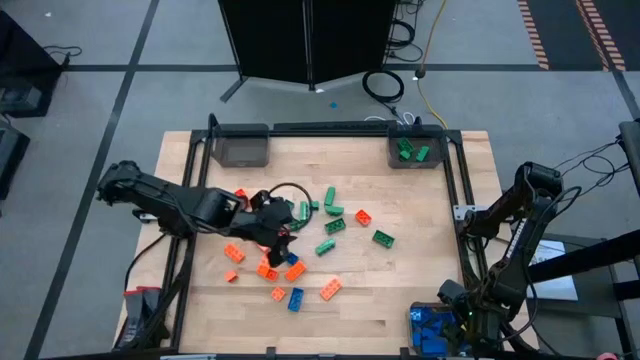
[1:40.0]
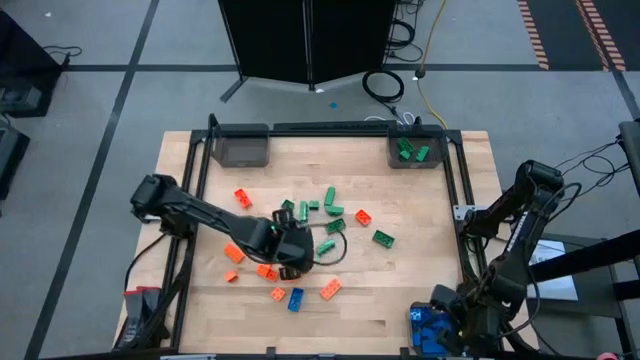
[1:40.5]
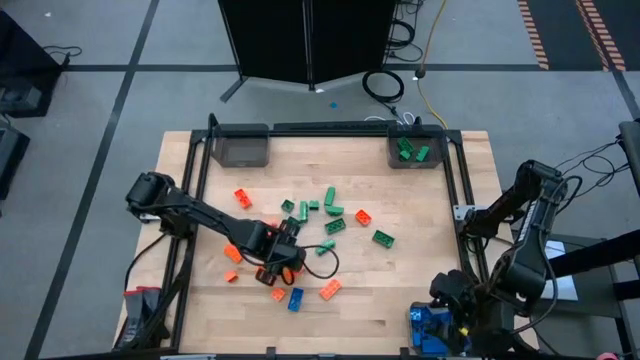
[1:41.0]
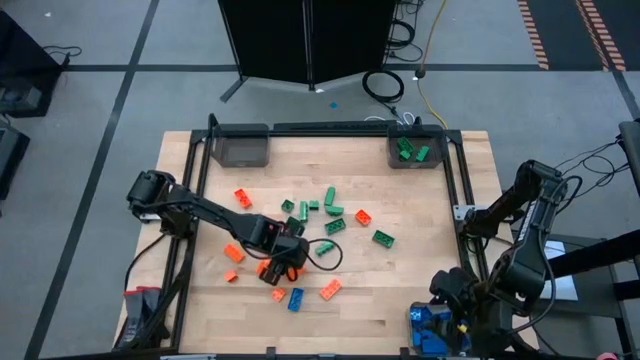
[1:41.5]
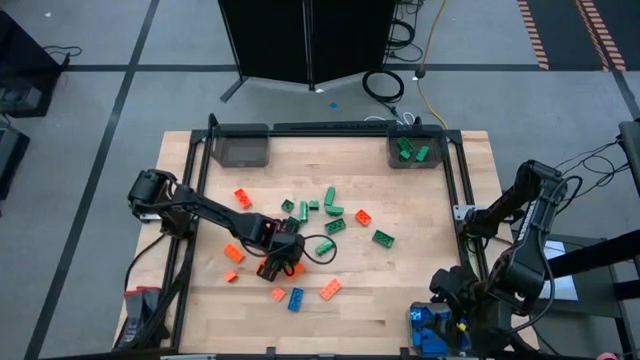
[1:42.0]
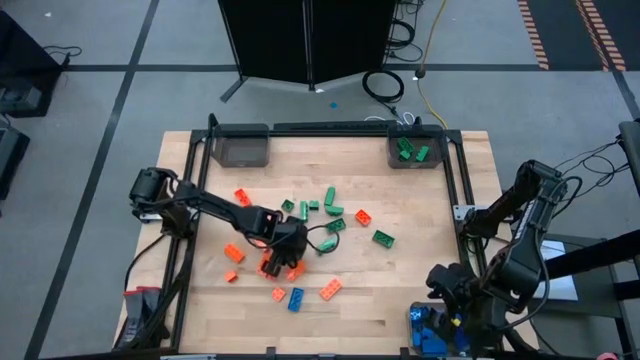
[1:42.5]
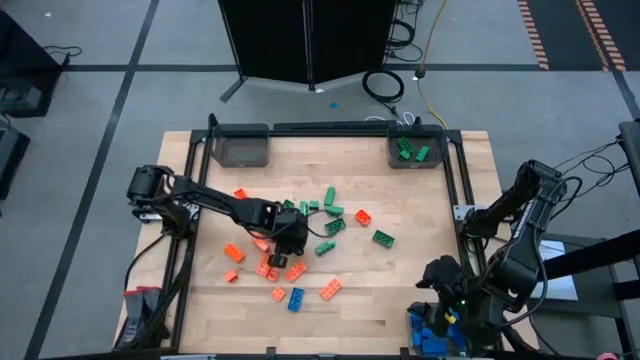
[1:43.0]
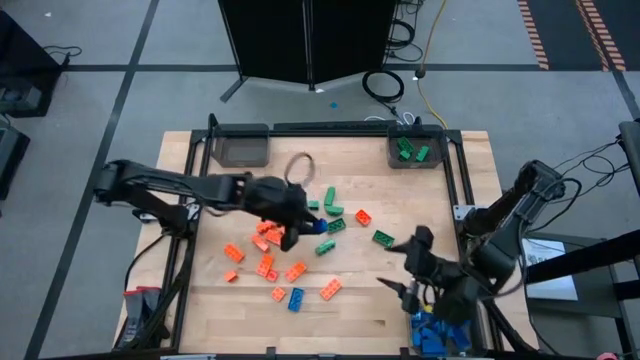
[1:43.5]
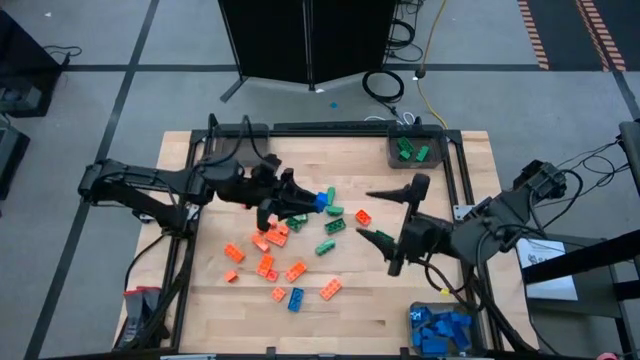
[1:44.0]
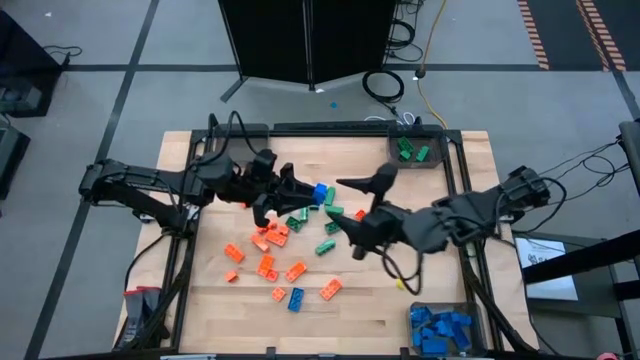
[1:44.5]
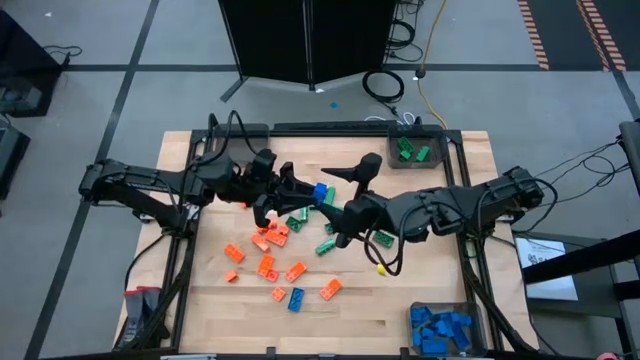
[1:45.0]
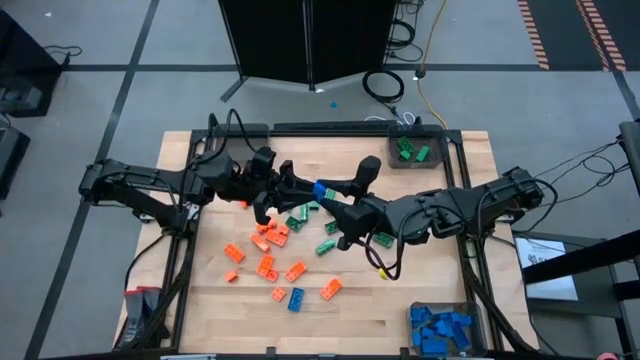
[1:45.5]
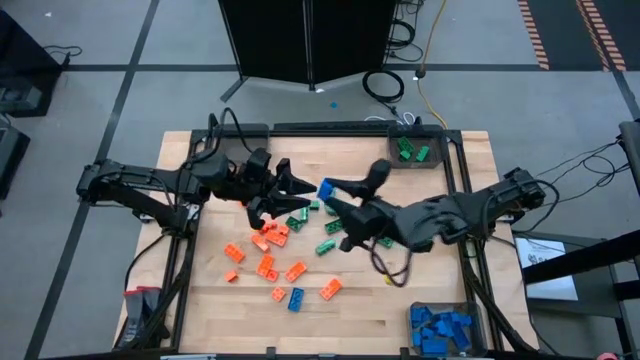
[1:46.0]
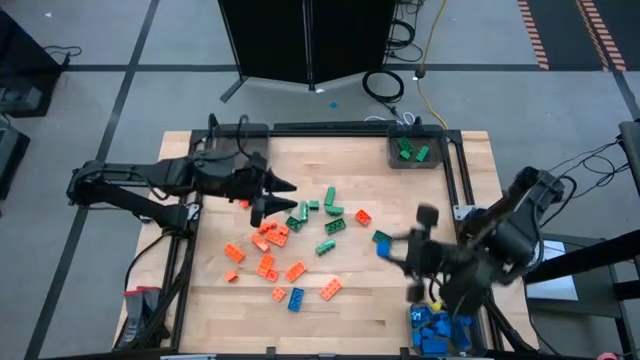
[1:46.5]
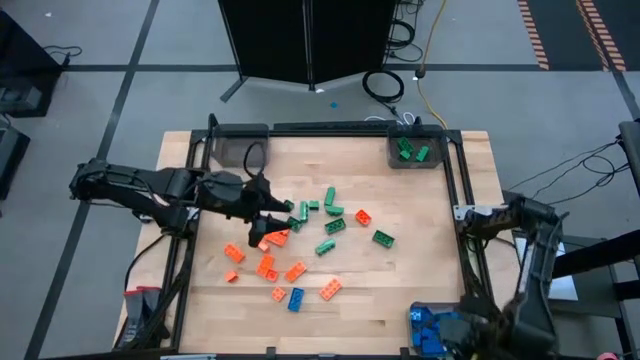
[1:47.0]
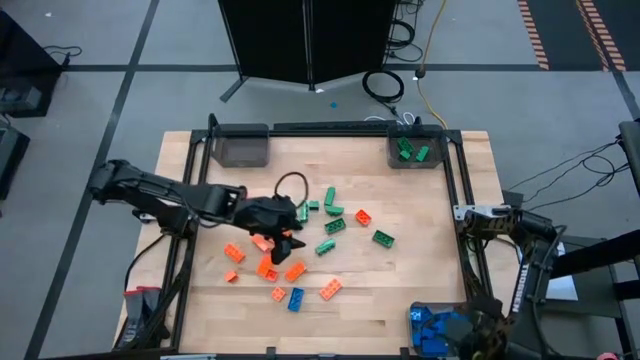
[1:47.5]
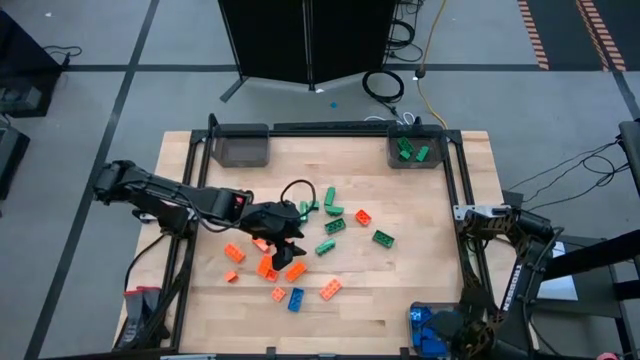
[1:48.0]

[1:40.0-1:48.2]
Task: Sort blocks
Put the blue game piece into the bottom black bin

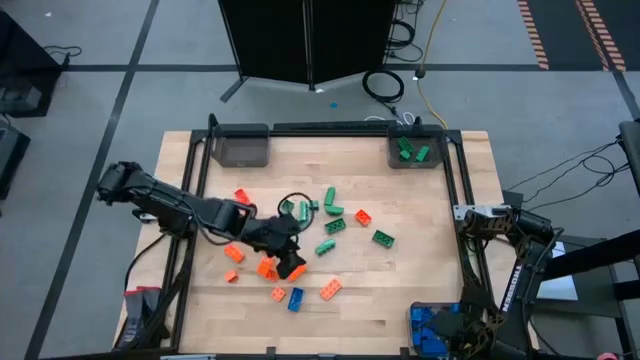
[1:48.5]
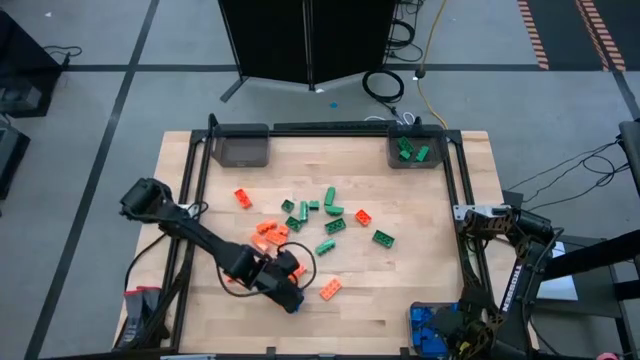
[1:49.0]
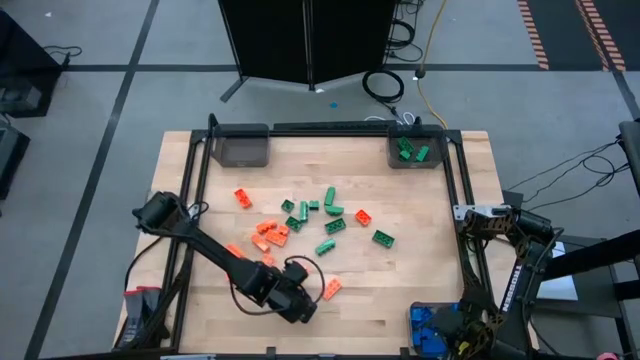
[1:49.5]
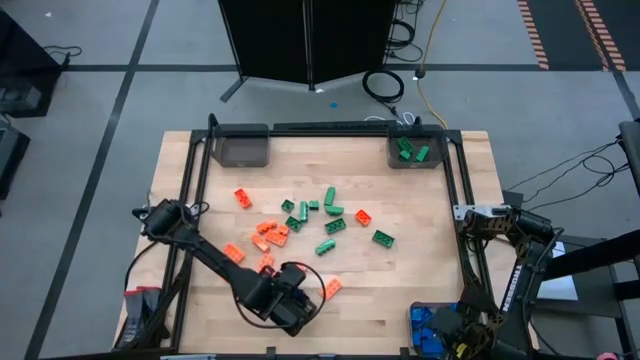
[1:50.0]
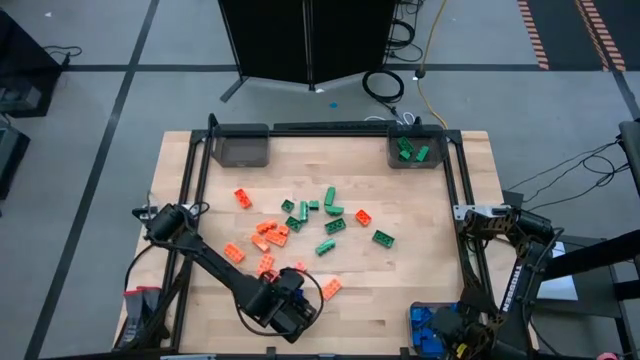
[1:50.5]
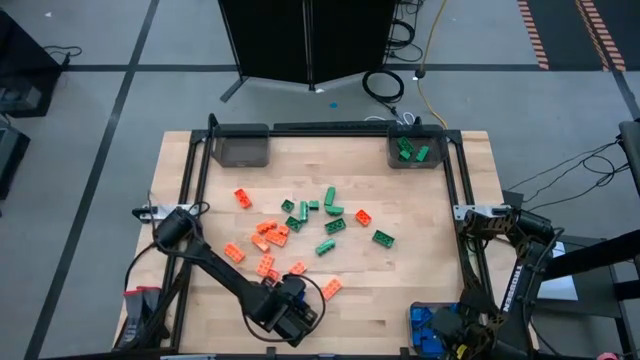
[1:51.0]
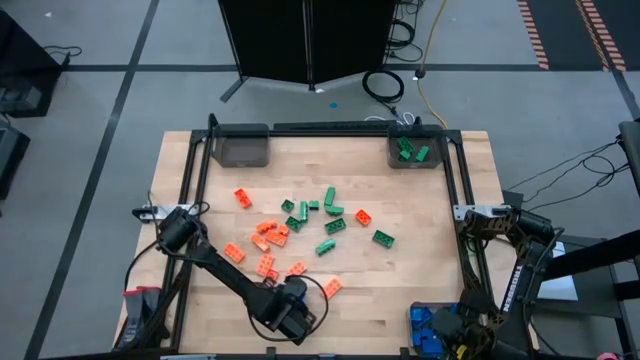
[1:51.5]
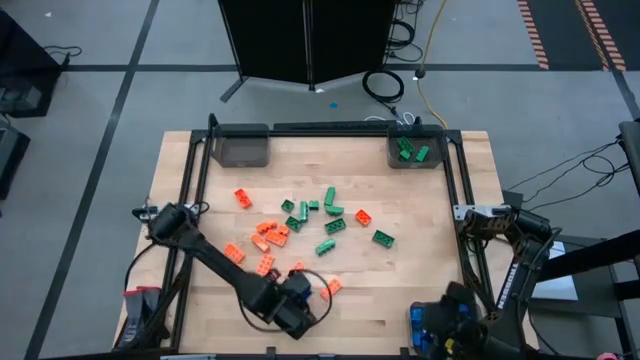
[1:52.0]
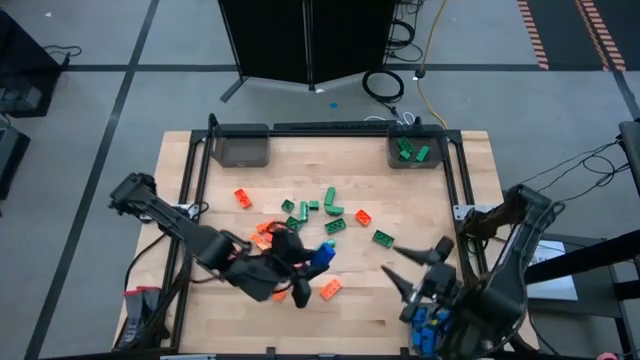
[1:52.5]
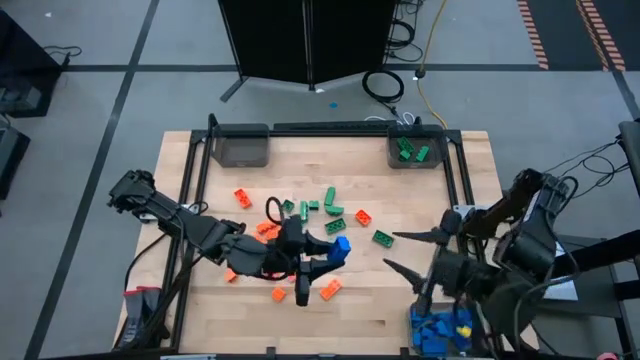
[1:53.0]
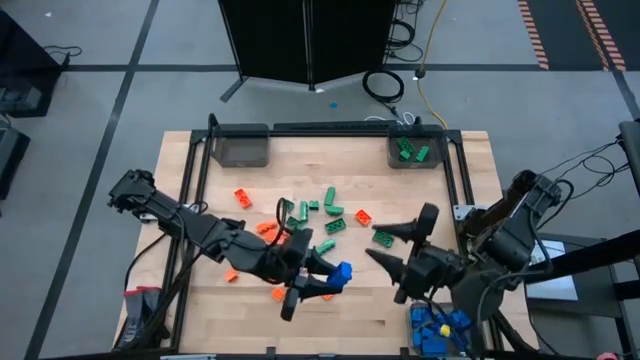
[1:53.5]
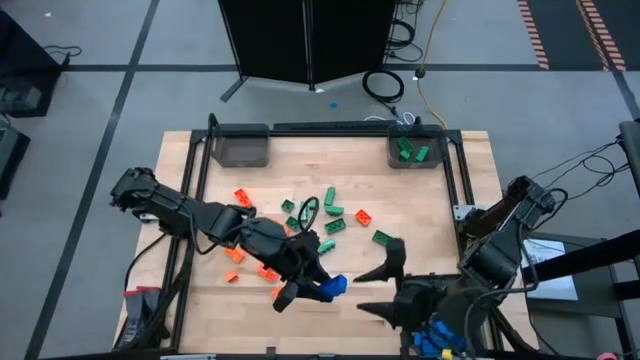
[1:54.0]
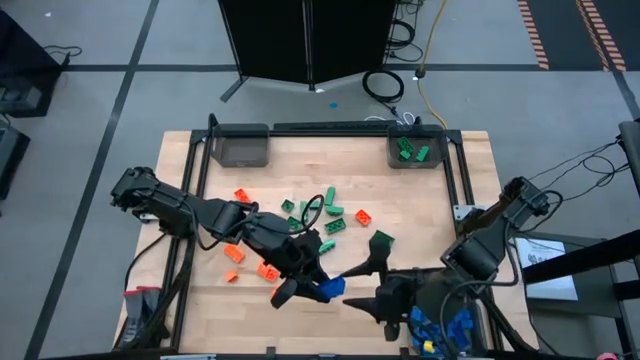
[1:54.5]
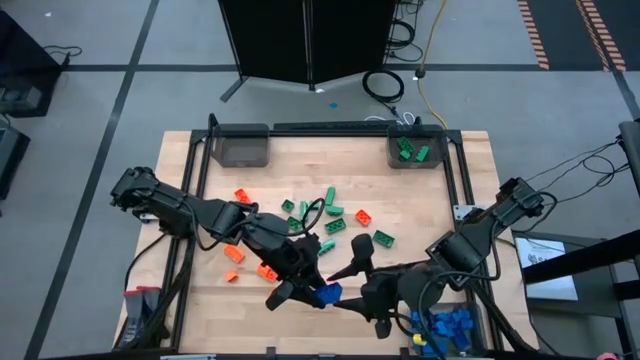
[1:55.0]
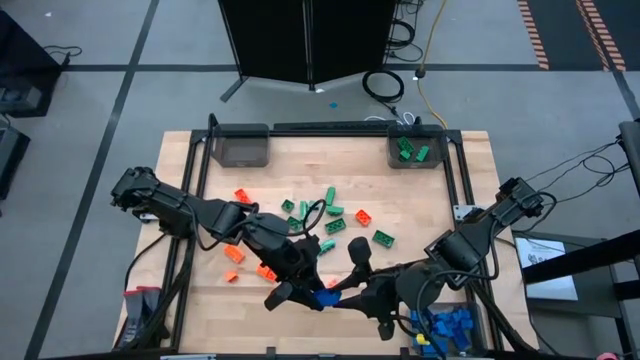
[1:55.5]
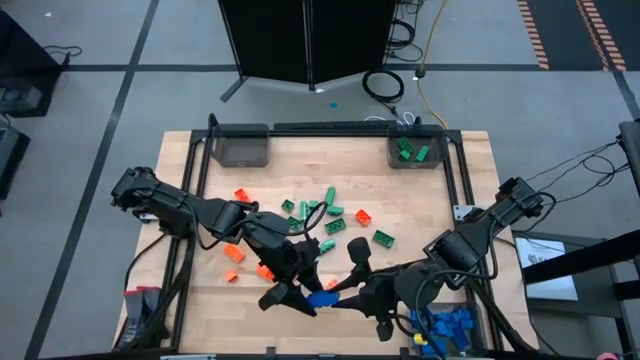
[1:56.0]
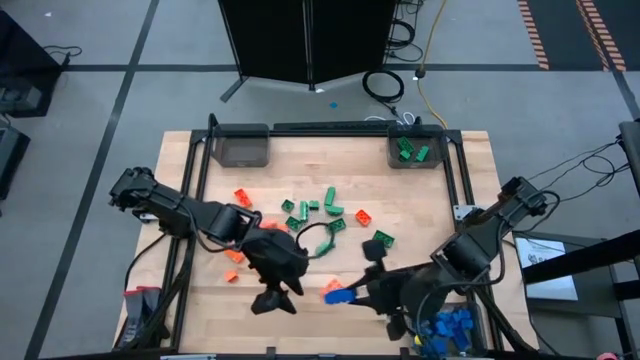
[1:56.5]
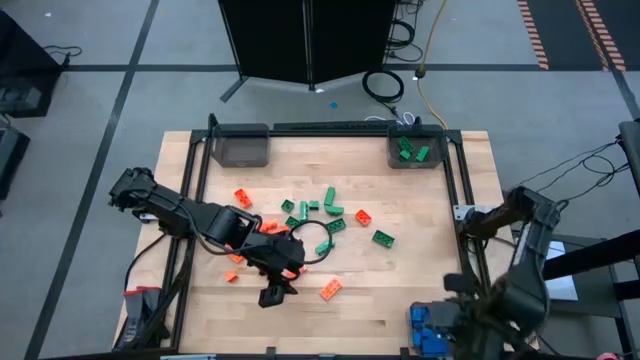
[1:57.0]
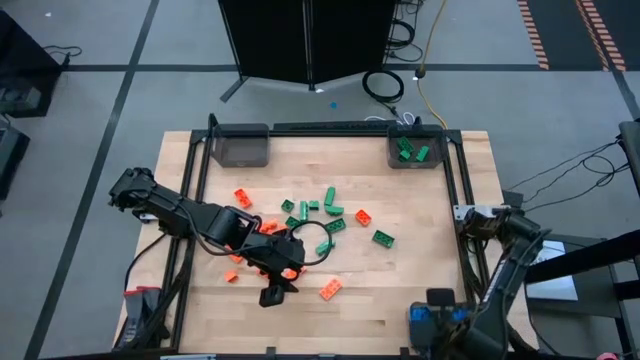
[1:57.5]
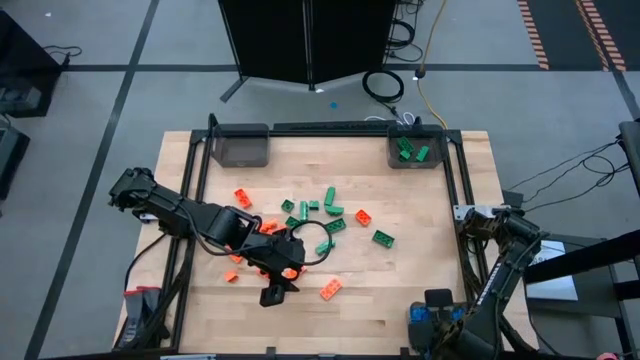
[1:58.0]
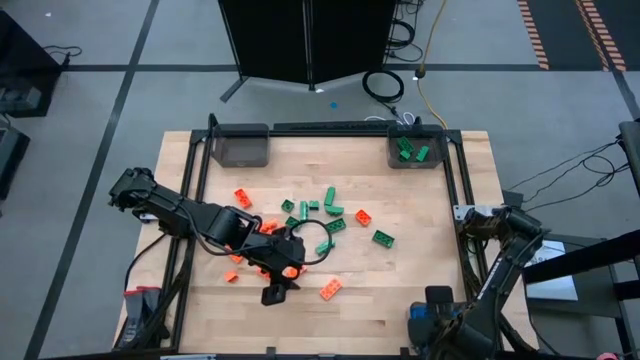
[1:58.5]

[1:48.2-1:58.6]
Put the blue game piece into the bottom black bin

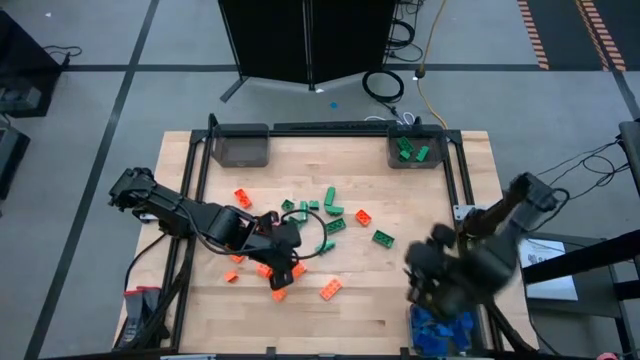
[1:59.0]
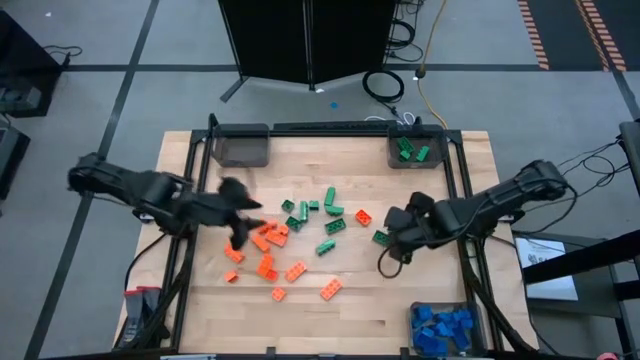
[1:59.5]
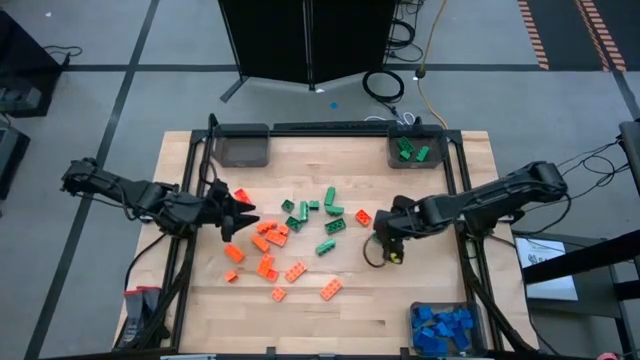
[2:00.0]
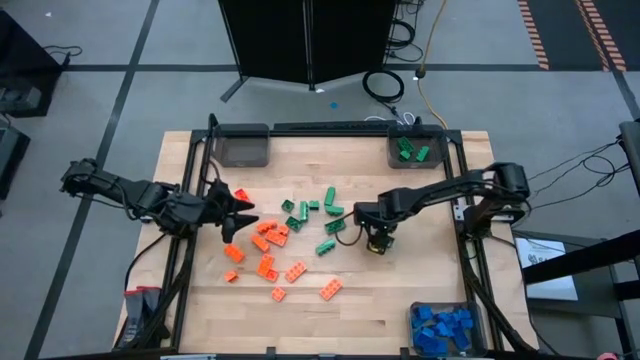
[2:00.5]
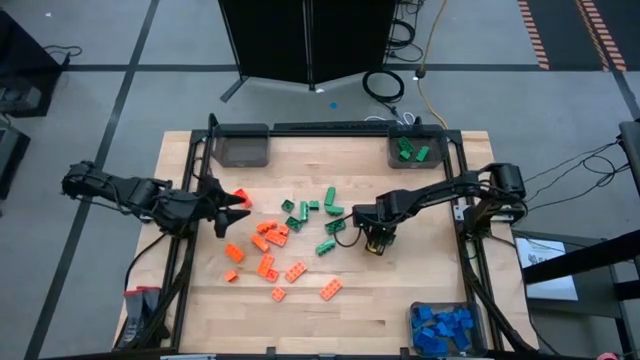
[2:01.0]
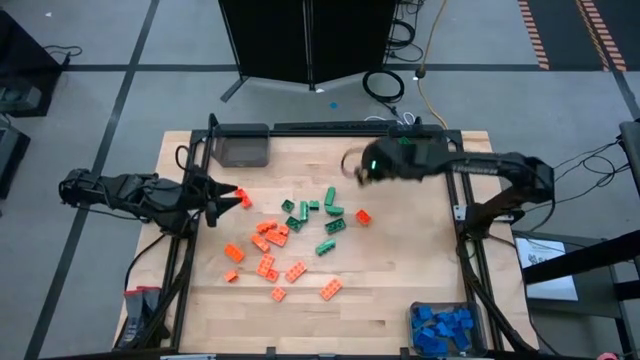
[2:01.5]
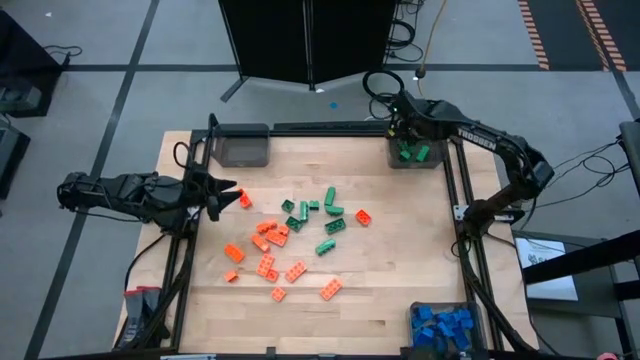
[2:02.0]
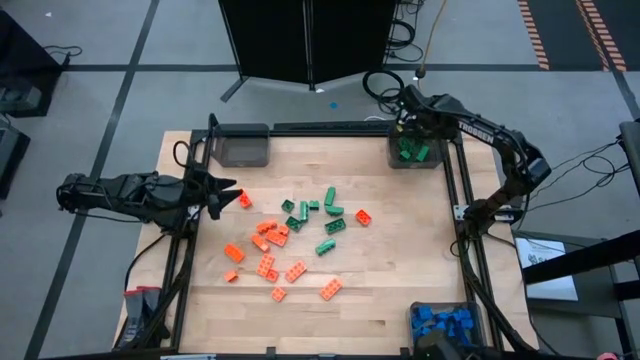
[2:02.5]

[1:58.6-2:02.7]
Put the green game piece into the top right black bin
